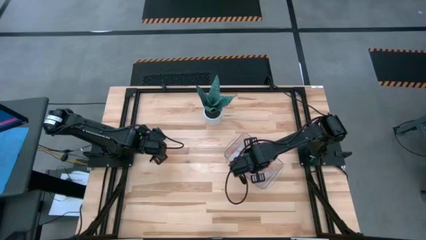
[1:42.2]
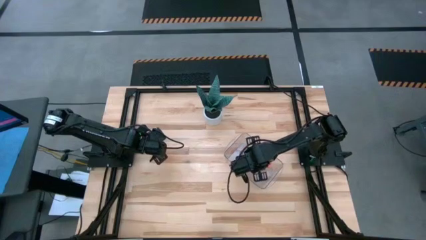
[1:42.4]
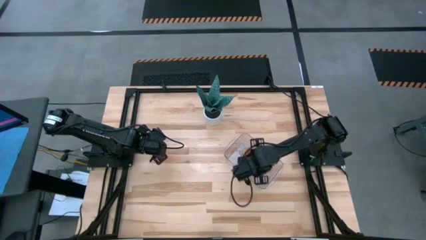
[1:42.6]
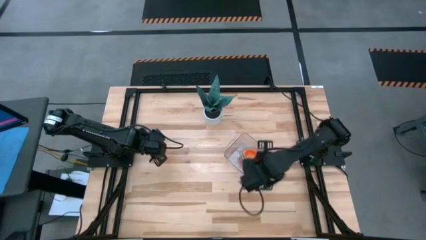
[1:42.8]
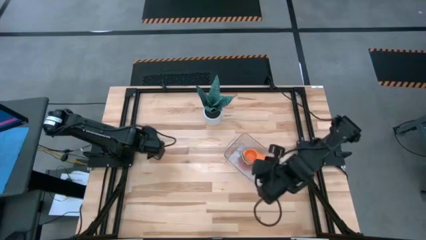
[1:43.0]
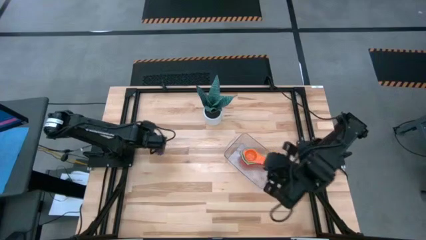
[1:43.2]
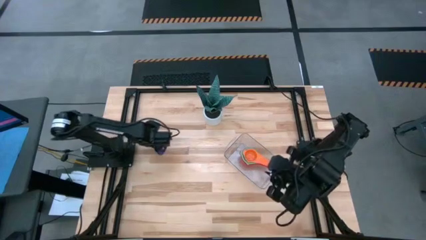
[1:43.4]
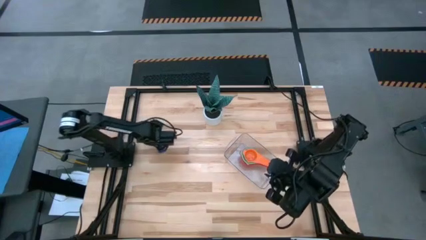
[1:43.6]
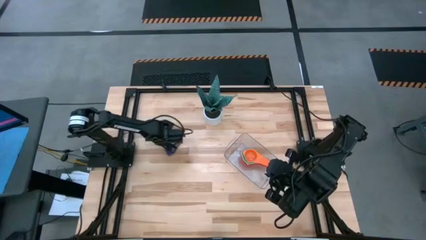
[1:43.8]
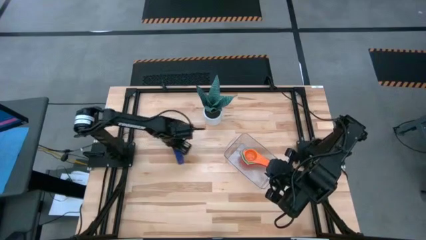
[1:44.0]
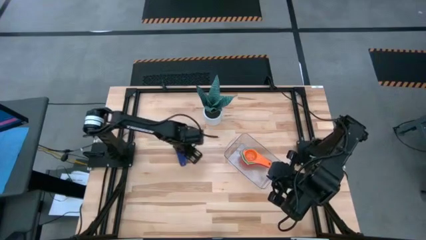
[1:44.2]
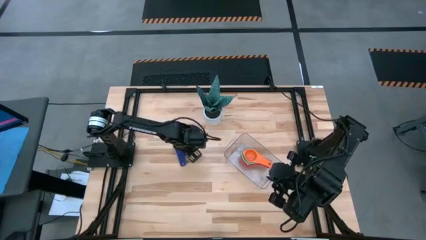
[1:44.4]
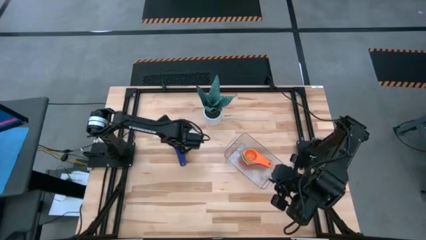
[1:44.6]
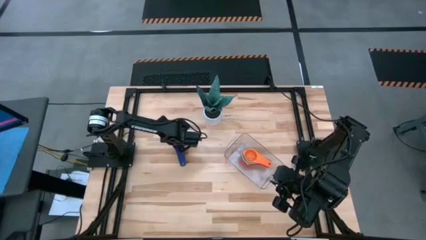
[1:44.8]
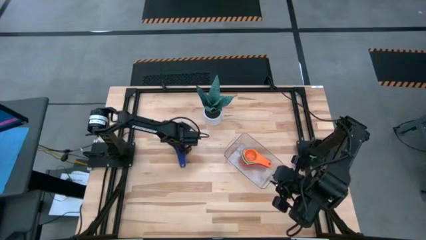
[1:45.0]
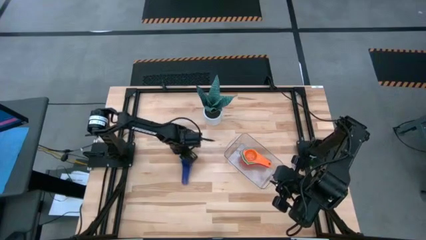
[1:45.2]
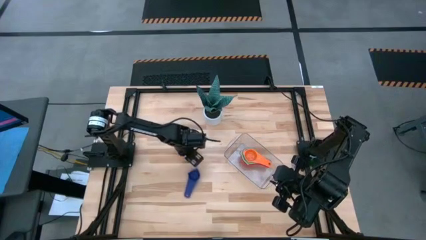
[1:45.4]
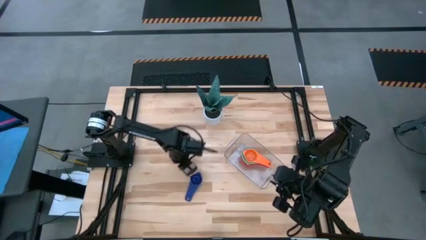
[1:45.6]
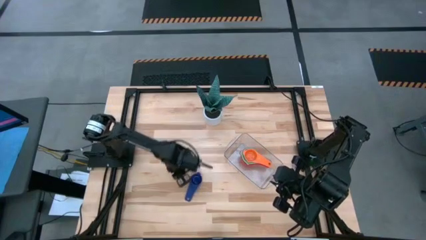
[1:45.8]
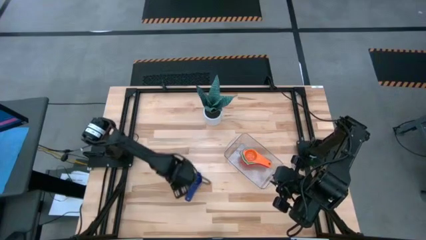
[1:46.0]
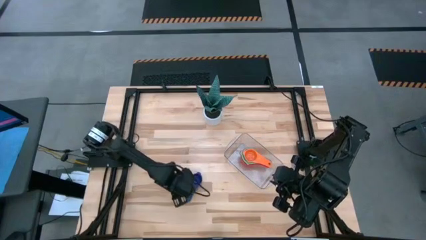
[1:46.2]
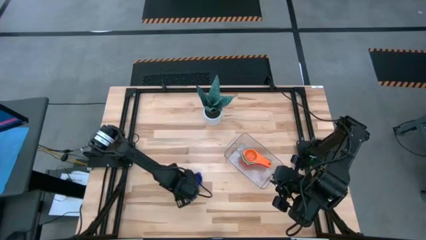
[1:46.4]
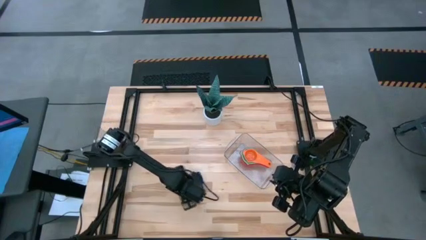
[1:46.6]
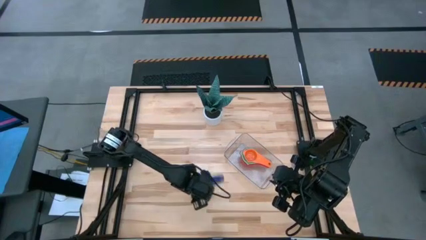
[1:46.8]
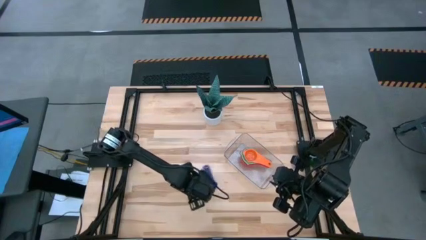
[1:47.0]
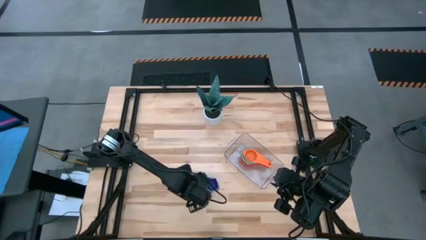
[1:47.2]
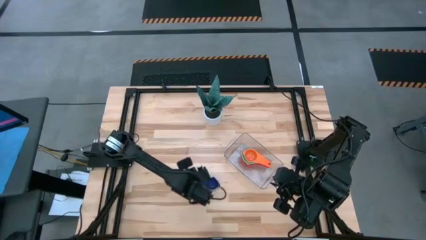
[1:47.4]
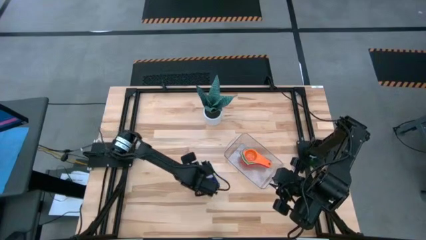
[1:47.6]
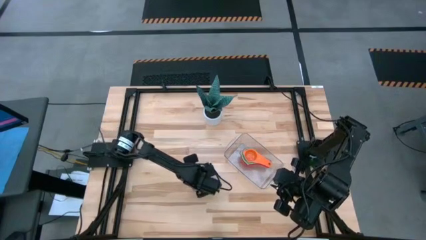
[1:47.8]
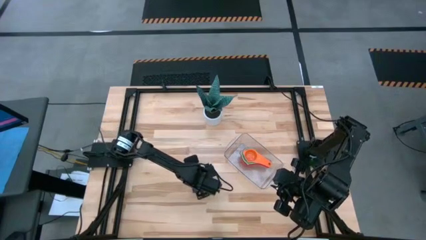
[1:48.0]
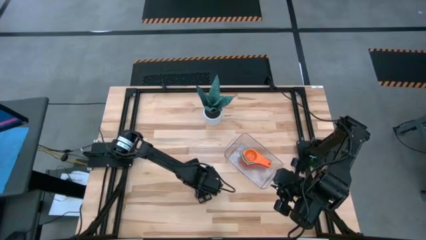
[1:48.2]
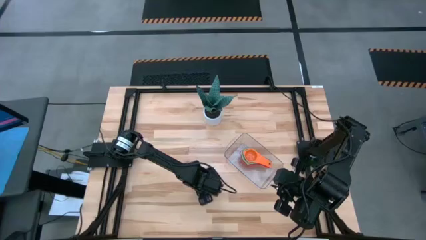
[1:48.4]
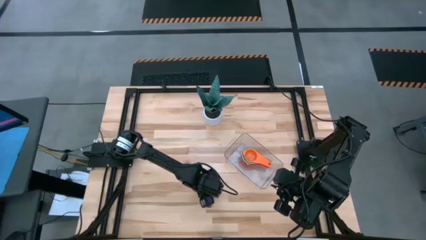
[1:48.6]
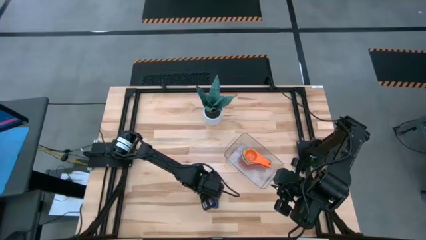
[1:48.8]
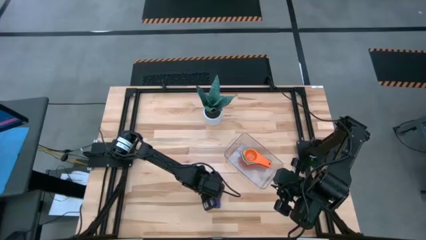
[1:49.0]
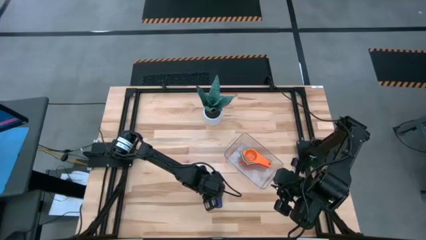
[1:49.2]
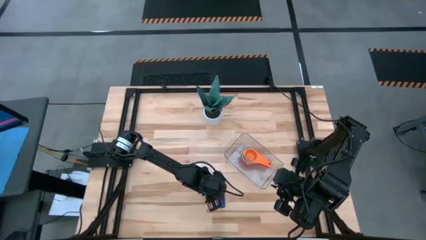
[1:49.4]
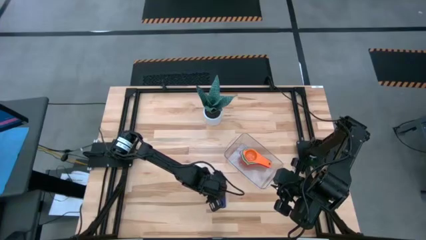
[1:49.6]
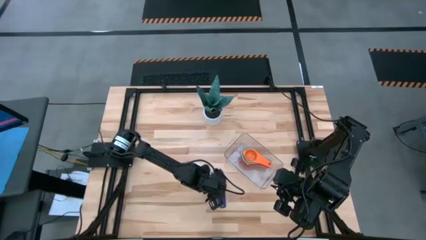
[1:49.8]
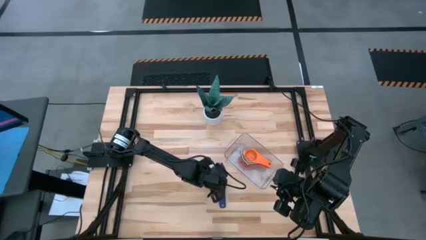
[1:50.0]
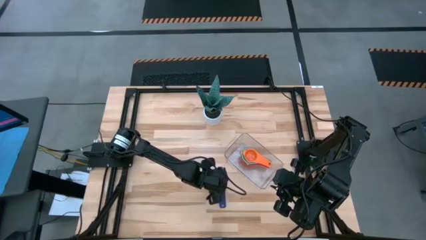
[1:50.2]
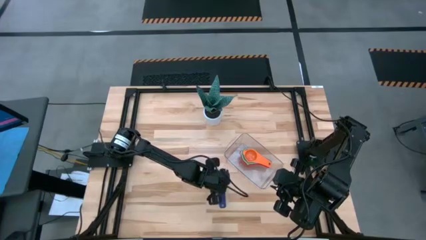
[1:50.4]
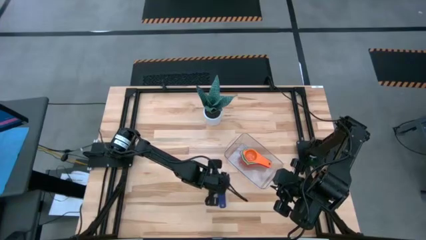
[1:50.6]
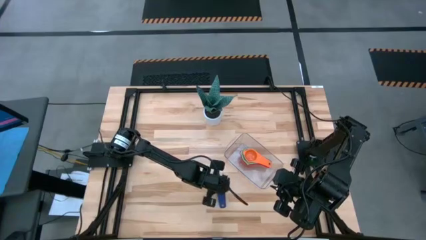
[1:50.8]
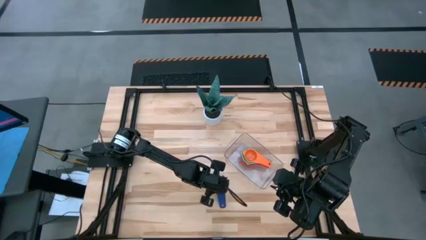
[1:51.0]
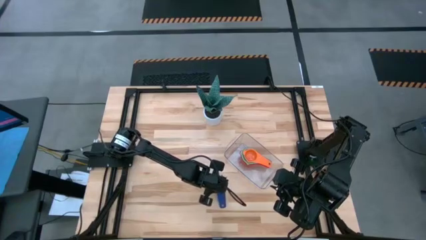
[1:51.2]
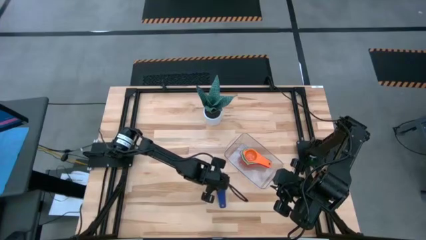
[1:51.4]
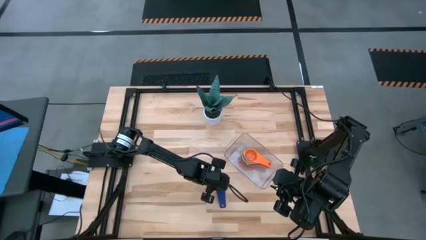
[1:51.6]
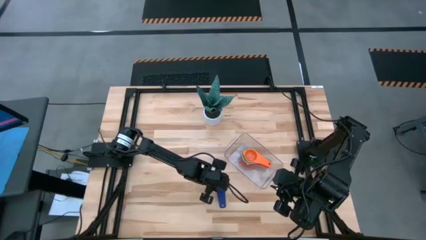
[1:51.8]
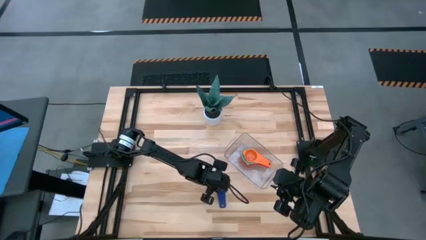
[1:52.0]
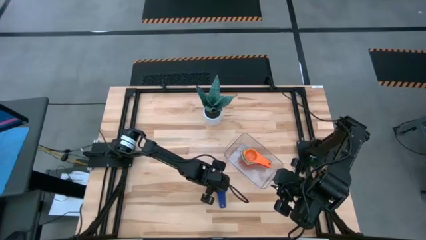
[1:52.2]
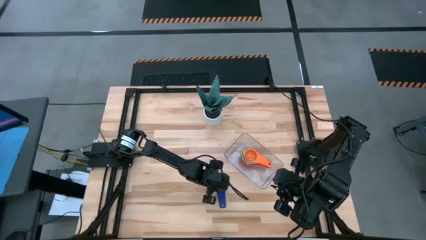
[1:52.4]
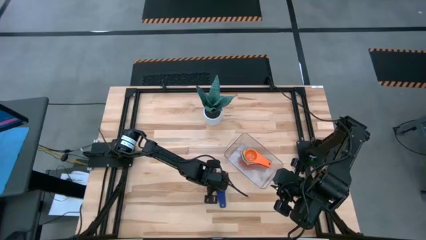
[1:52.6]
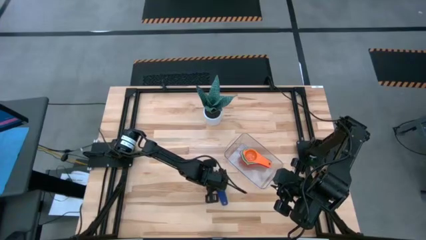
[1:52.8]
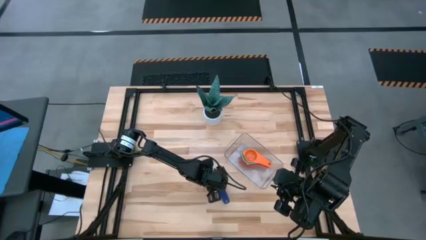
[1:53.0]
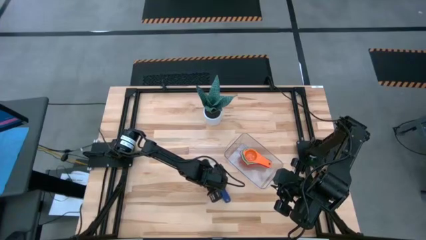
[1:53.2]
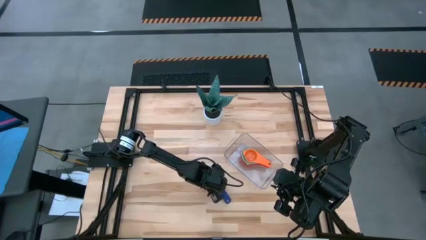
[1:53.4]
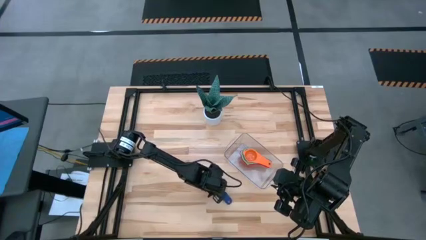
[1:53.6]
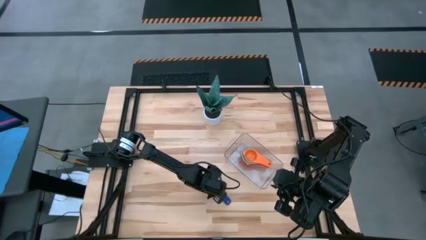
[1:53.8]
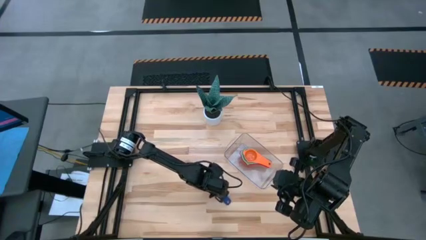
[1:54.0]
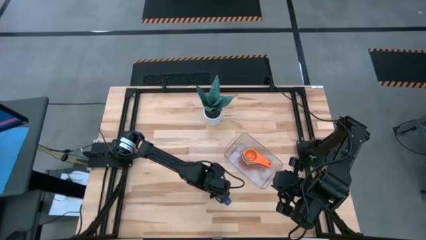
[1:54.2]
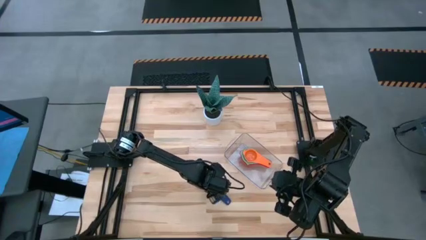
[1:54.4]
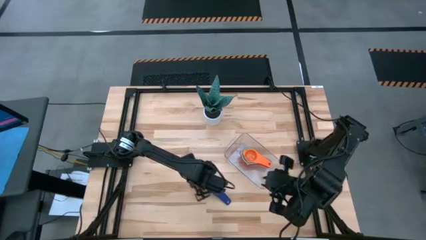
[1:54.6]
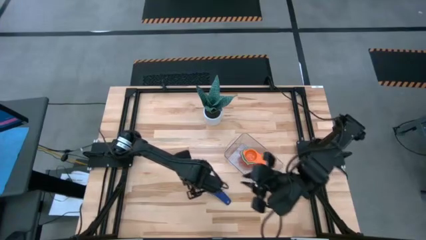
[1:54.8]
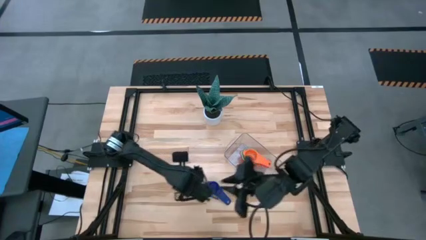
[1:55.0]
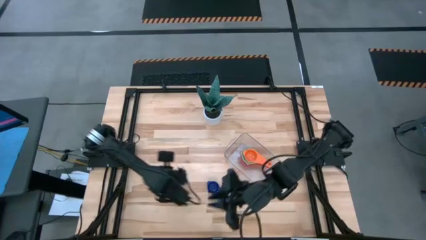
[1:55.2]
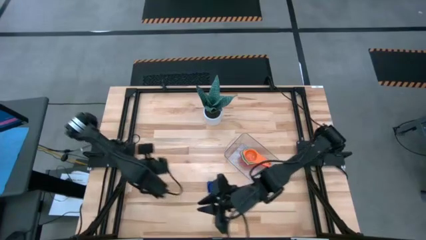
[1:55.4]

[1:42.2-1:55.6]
Task: Nest measuring cups in basket
Stack the violet measuring cup on top of the orange measuring cup
